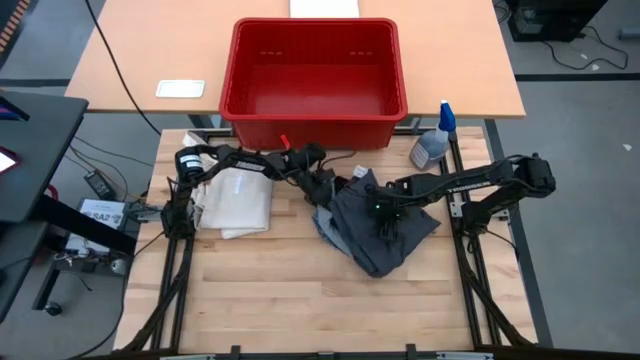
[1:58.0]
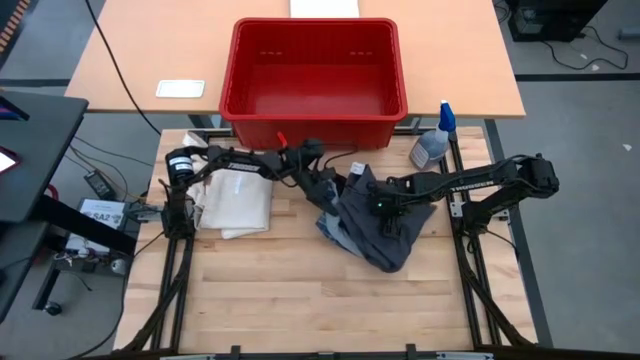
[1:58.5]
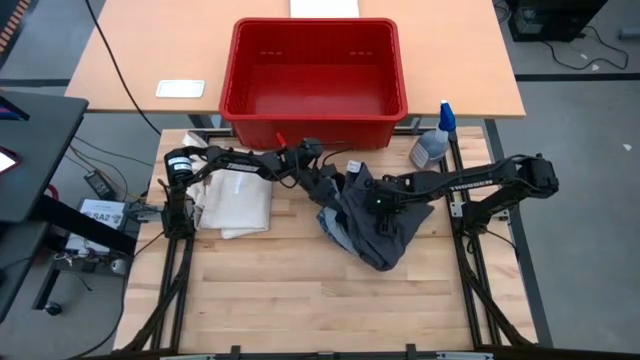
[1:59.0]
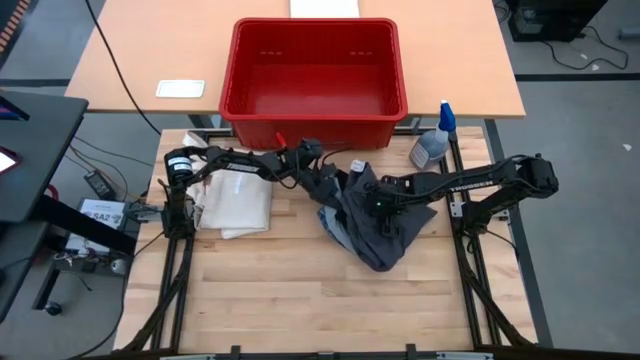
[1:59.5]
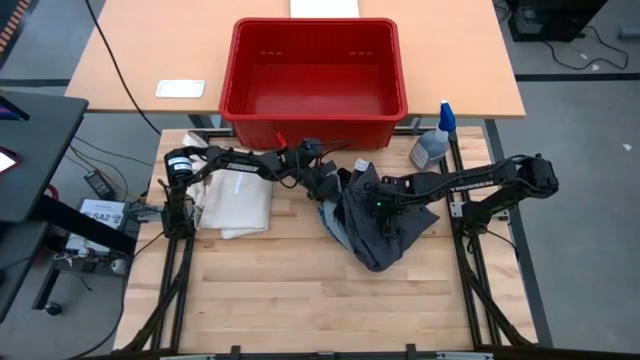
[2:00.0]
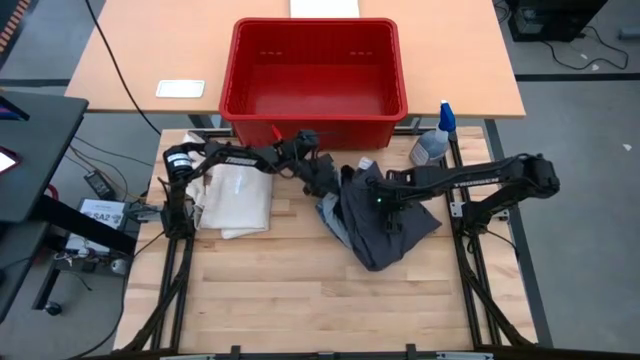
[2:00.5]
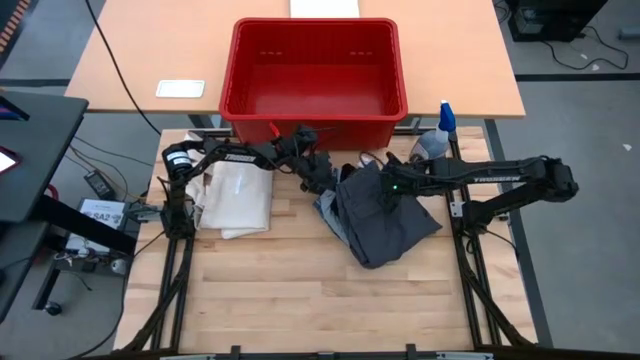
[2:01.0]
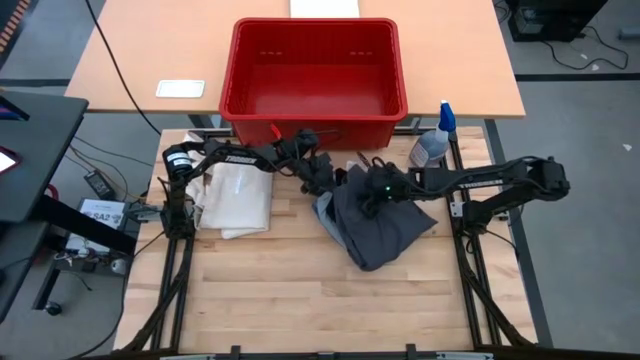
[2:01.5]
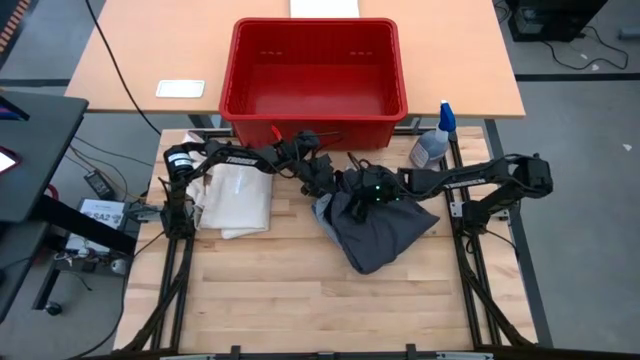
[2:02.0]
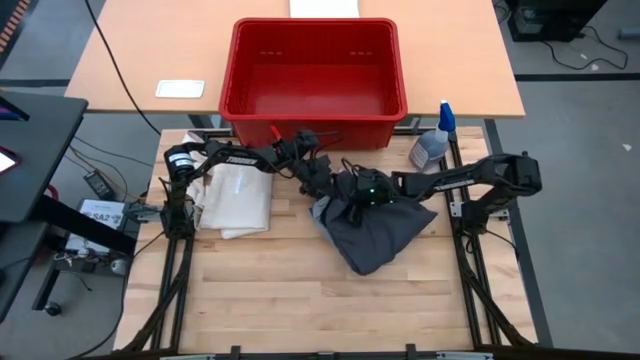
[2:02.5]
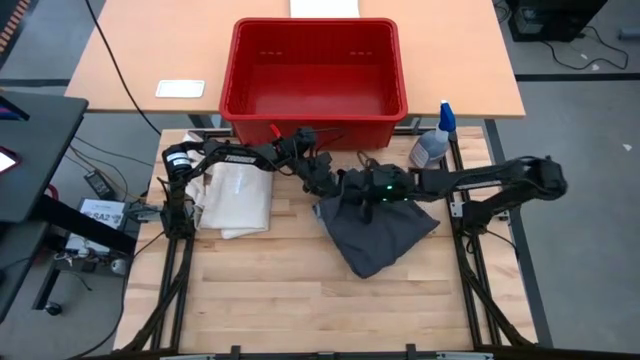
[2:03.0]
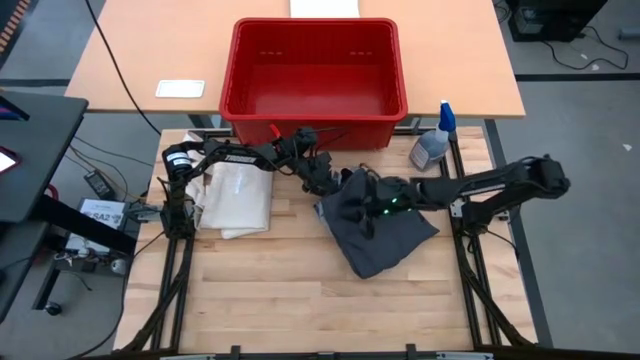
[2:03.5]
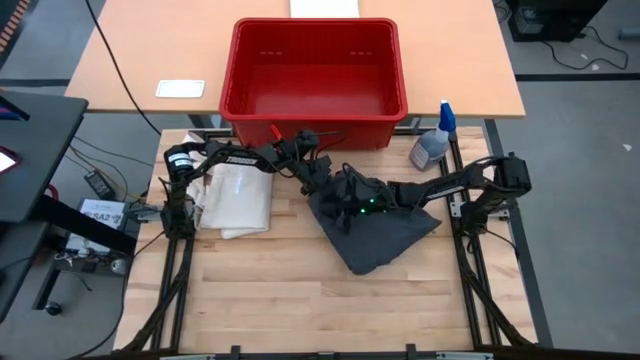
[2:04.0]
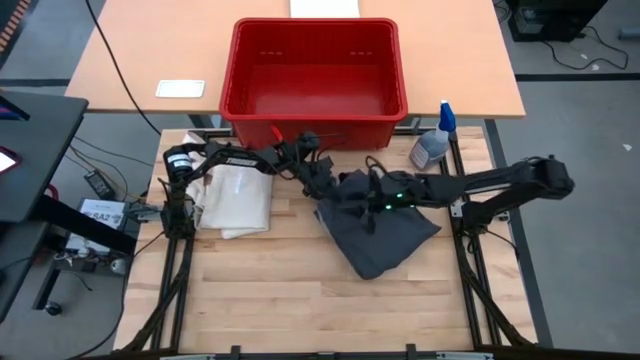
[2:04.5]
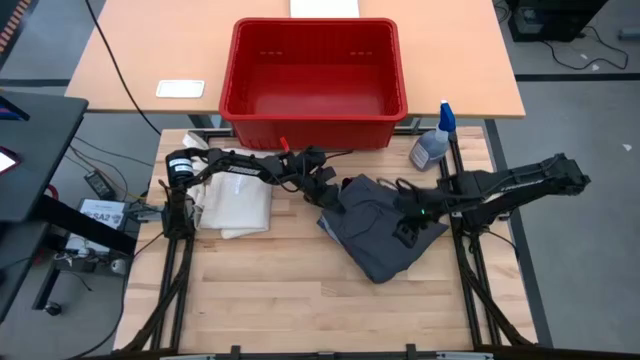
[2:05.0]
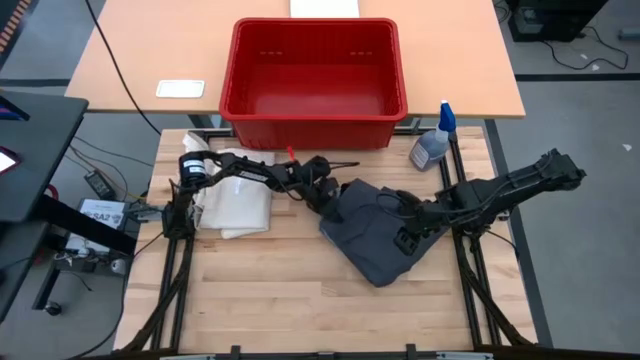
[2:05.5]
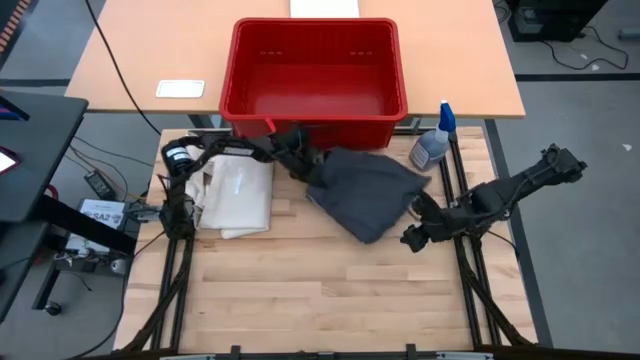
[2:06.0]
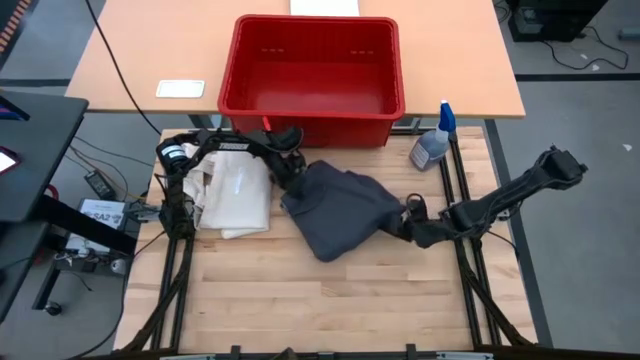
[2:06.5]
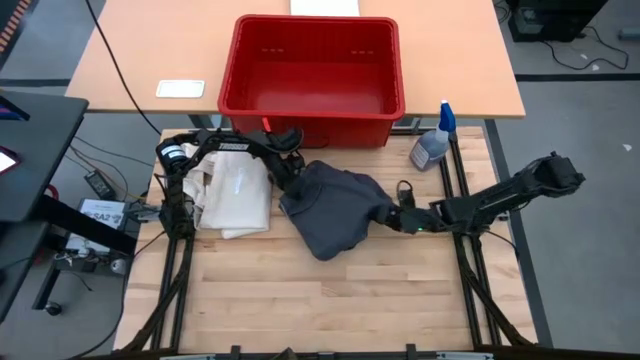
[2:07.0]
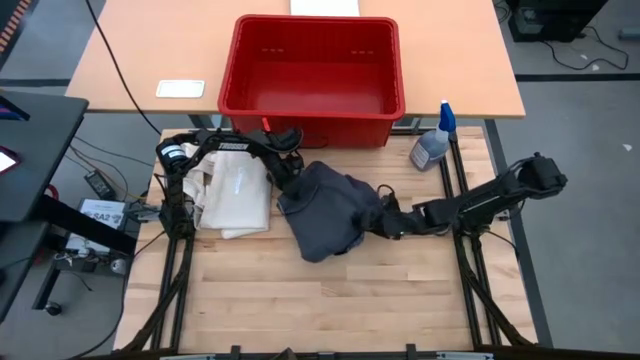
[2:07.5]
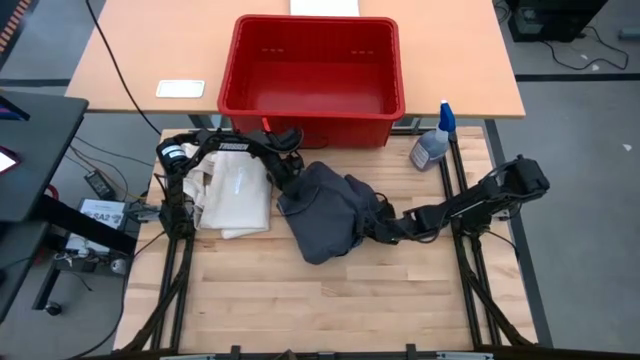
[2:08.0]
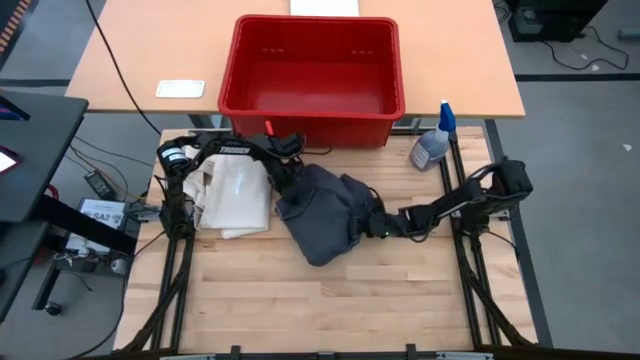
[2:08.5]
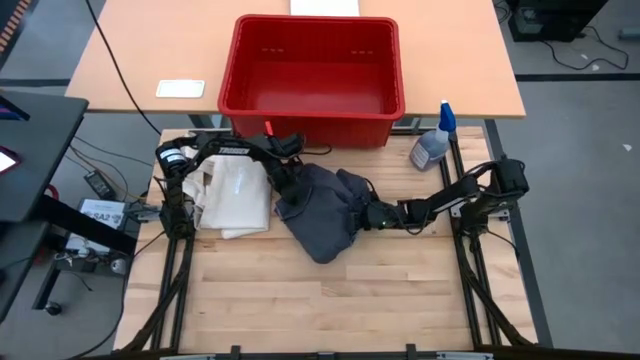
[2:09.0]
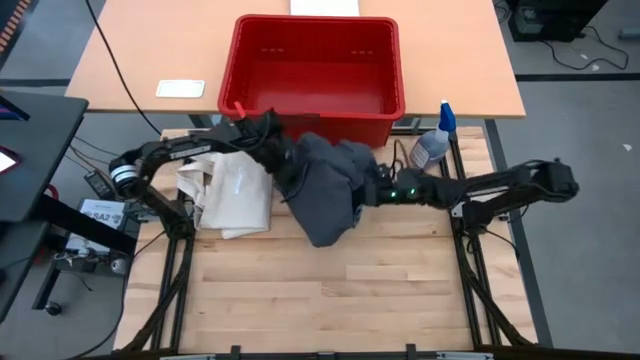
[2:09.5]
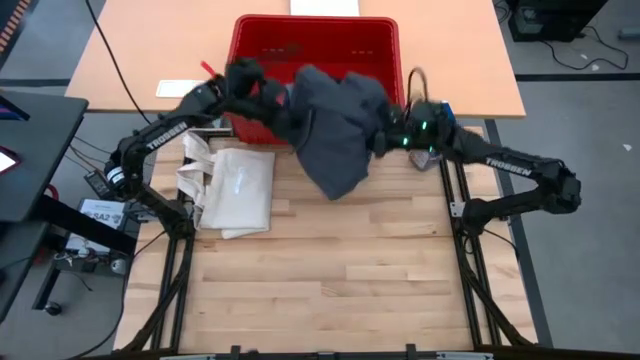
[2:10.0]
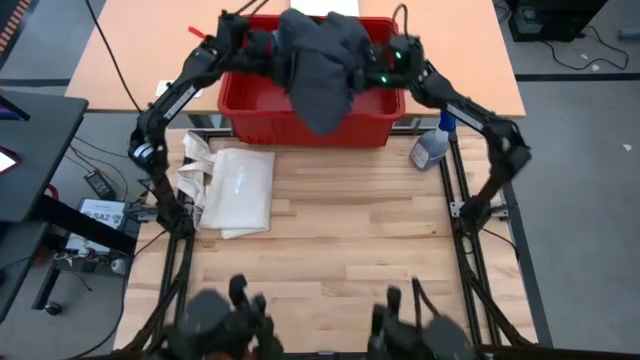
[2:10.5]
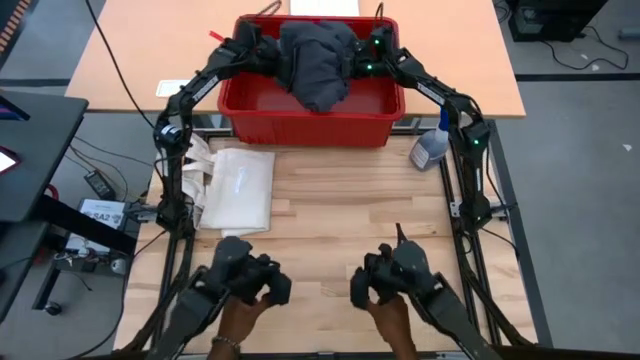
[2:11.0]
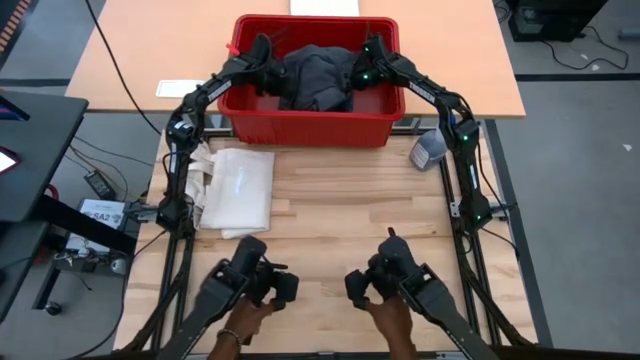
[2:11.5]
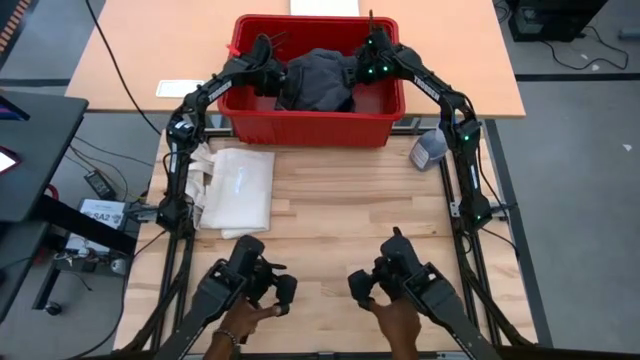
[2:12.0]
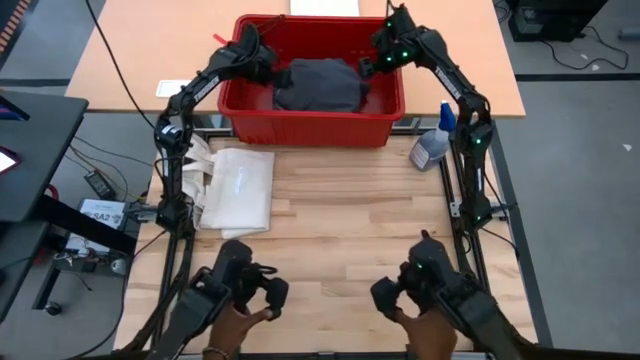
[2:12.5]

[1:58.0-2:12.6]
Task: Sort clothes
Put the stacked clothes into the red bin

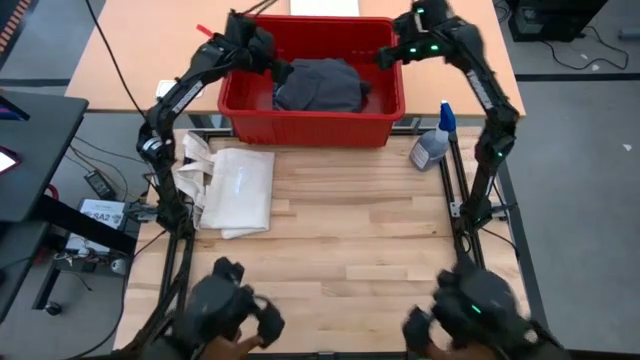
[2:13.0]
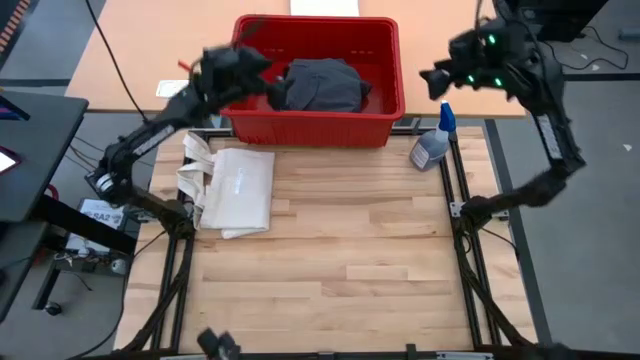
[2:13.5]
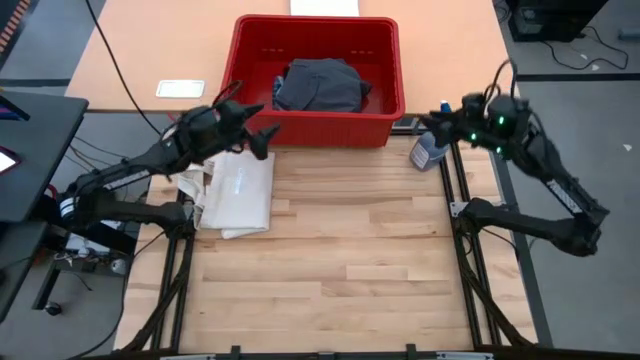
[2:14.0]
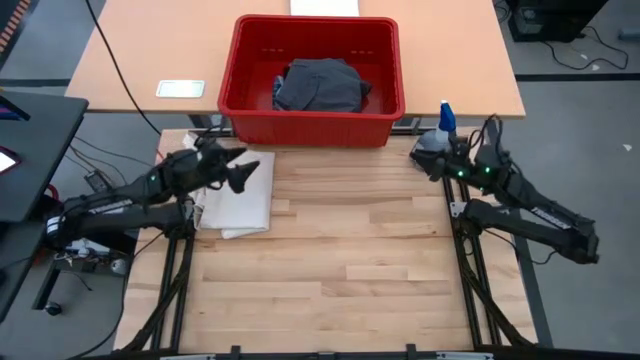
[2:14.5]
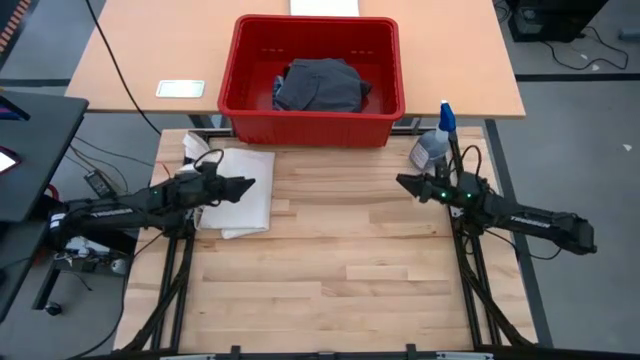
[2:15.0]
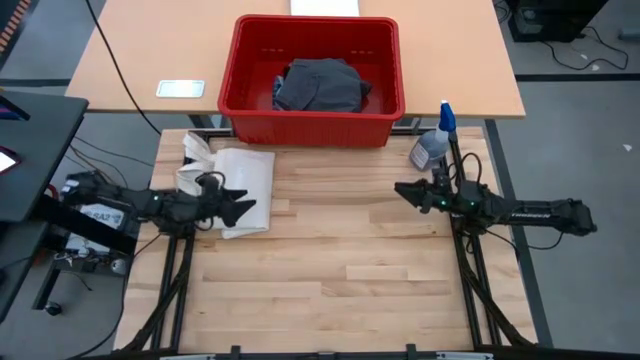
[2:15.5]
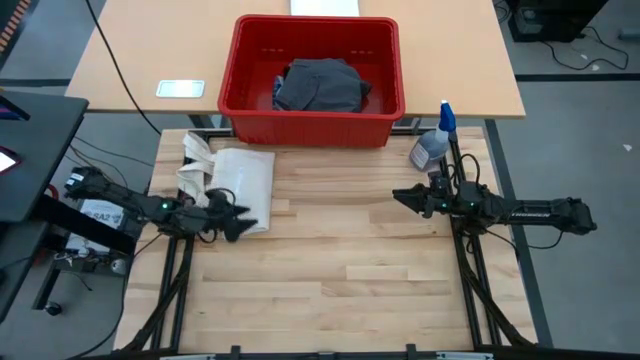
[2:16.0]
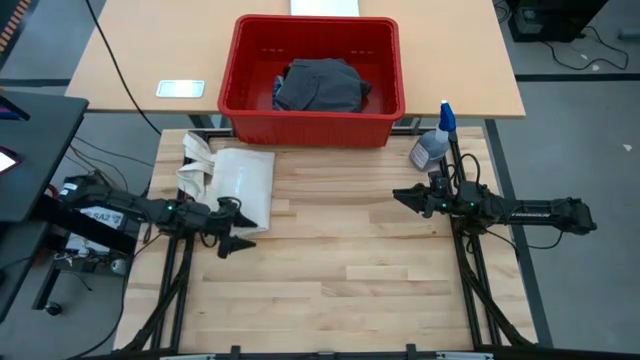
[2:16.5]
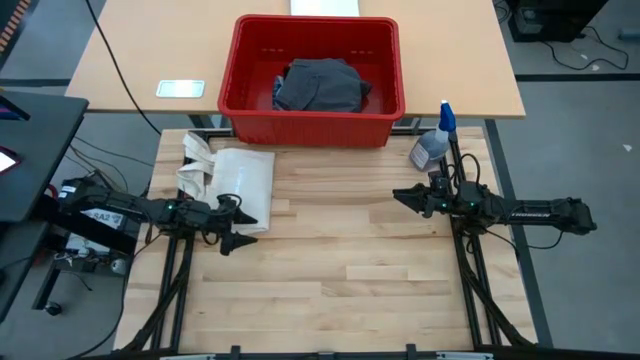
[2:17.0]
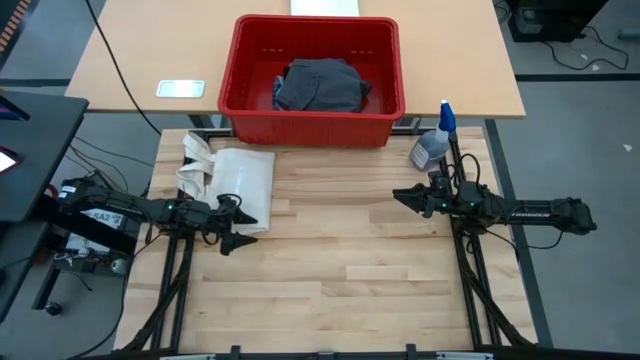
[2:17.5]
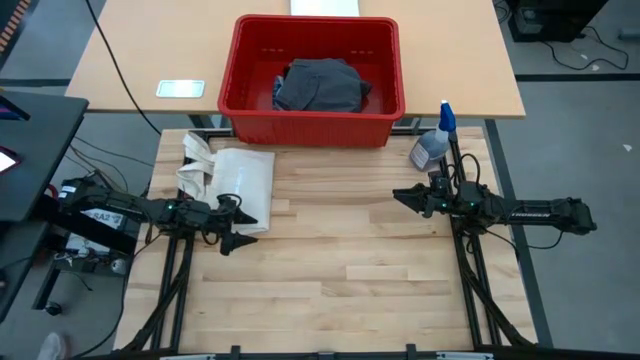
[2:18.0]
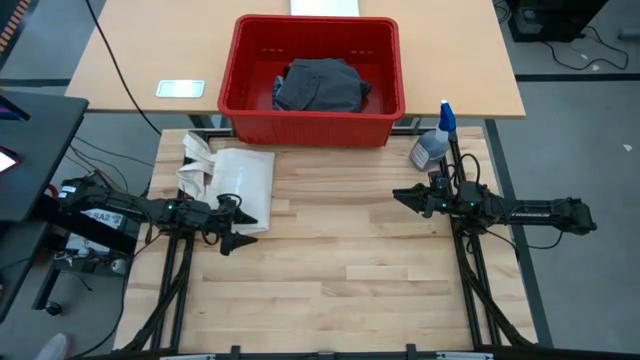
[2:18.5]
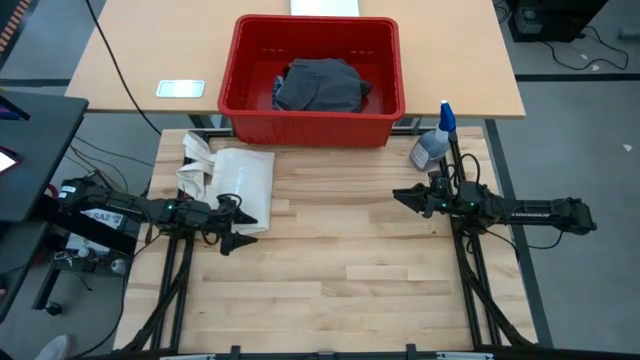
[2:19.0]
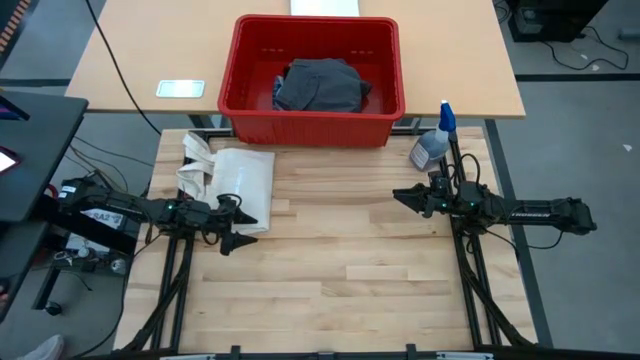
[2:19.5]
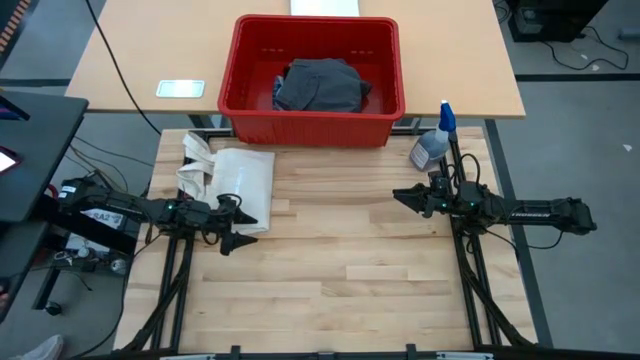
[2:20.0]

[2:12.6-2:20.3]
Return to Home Position
